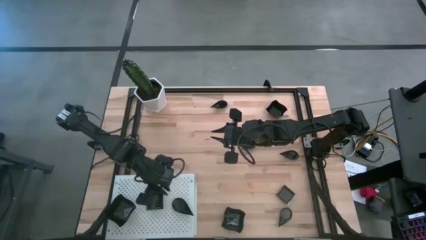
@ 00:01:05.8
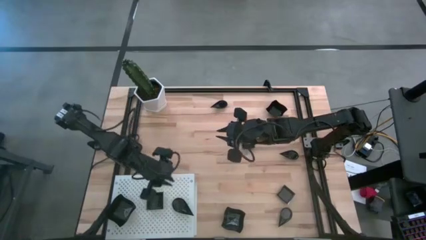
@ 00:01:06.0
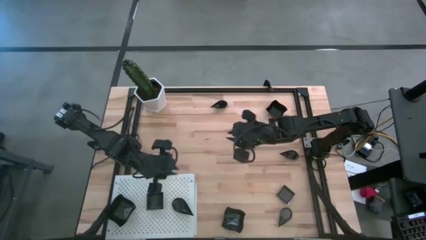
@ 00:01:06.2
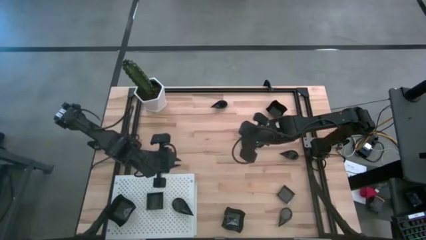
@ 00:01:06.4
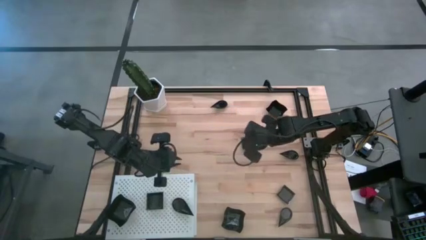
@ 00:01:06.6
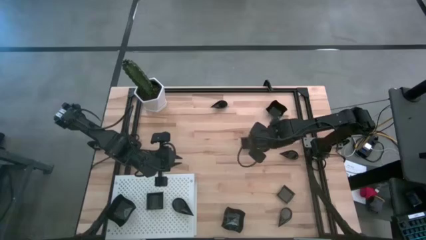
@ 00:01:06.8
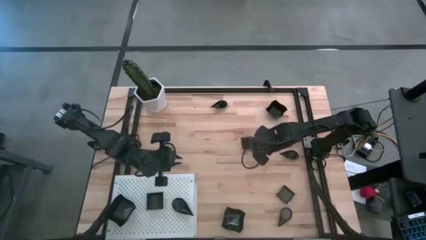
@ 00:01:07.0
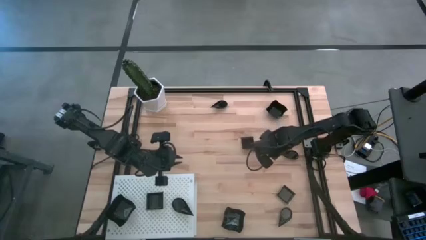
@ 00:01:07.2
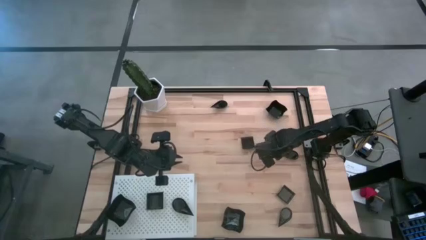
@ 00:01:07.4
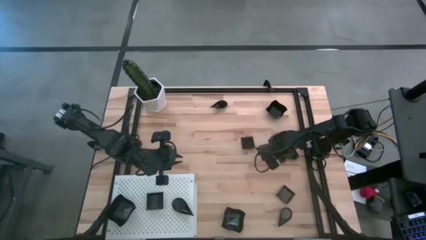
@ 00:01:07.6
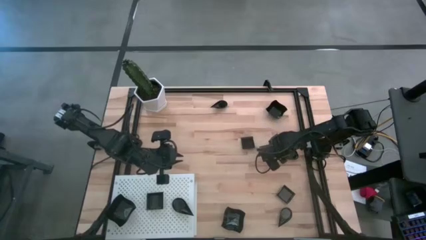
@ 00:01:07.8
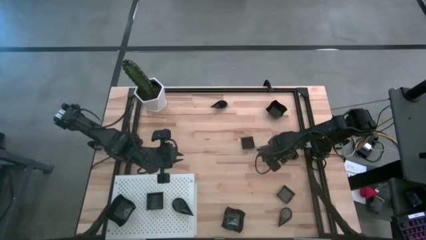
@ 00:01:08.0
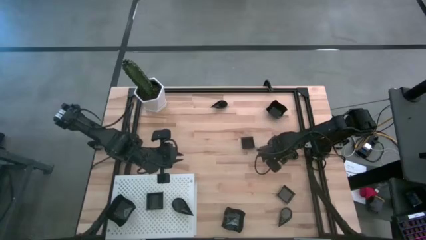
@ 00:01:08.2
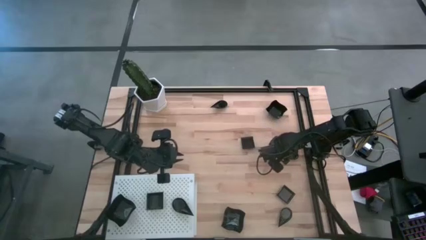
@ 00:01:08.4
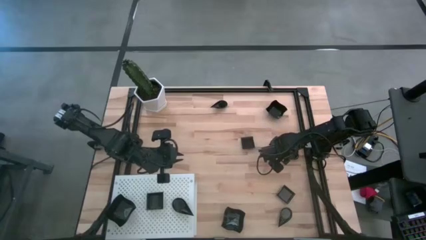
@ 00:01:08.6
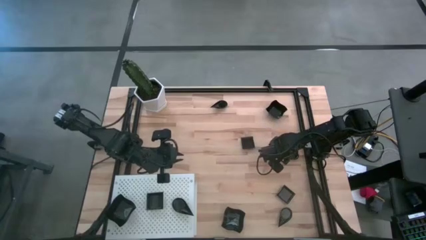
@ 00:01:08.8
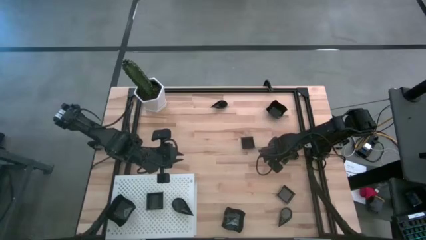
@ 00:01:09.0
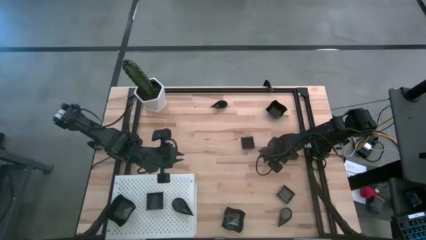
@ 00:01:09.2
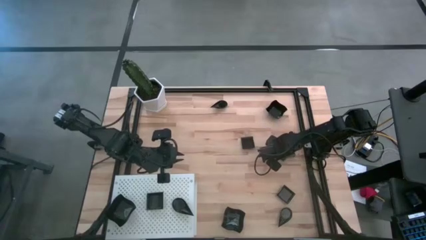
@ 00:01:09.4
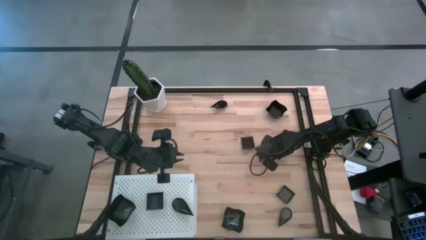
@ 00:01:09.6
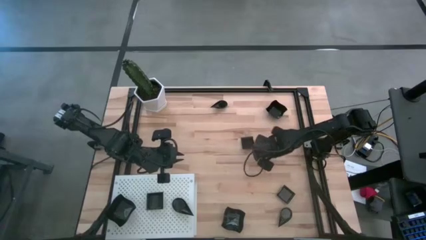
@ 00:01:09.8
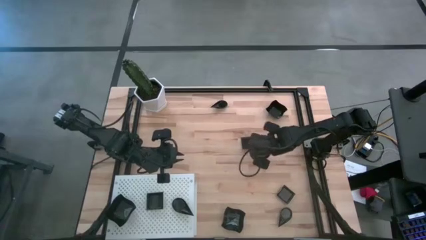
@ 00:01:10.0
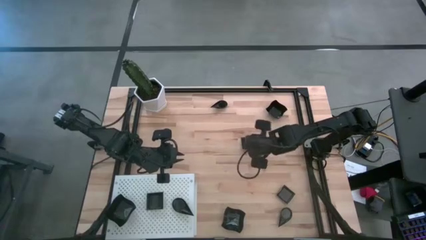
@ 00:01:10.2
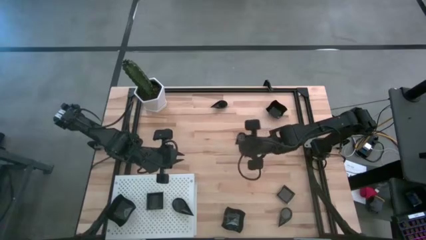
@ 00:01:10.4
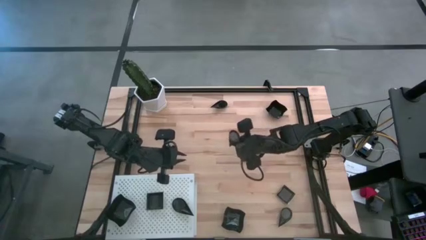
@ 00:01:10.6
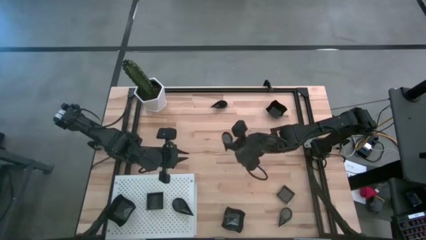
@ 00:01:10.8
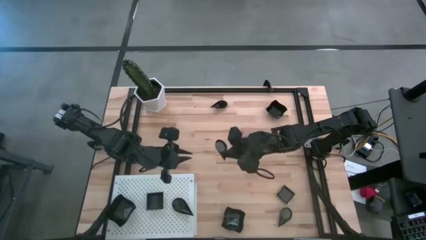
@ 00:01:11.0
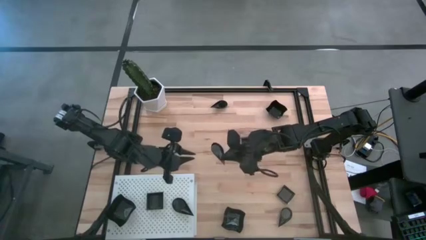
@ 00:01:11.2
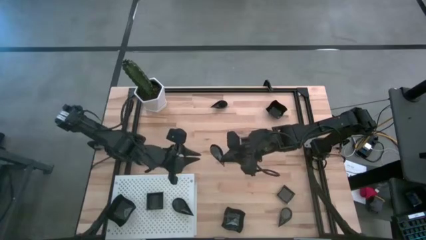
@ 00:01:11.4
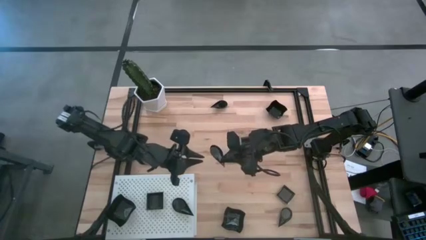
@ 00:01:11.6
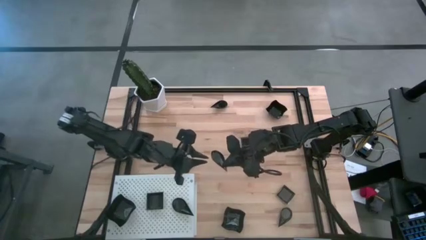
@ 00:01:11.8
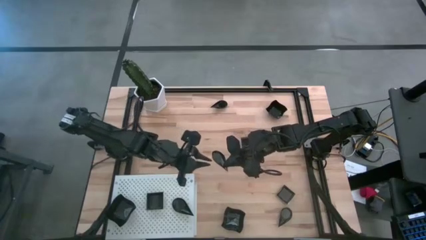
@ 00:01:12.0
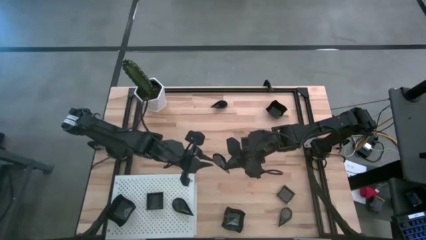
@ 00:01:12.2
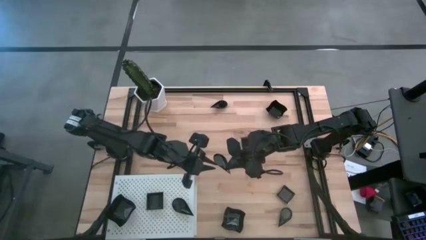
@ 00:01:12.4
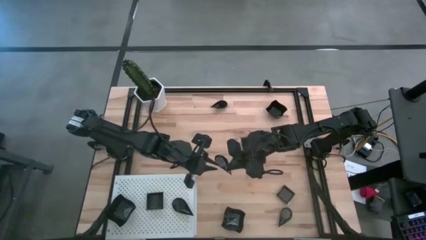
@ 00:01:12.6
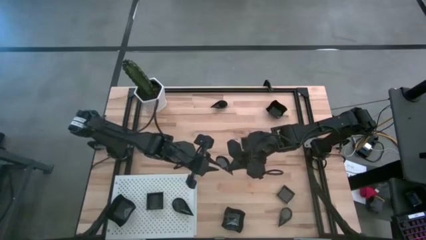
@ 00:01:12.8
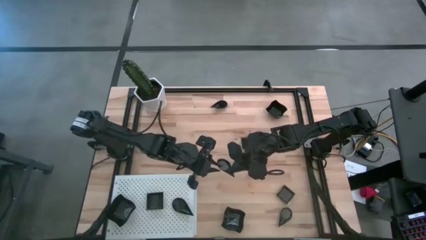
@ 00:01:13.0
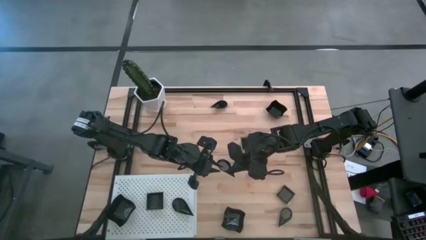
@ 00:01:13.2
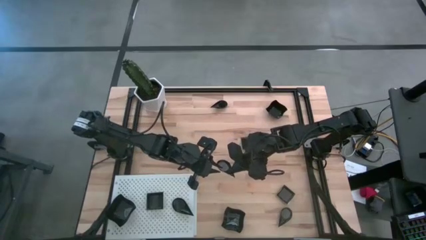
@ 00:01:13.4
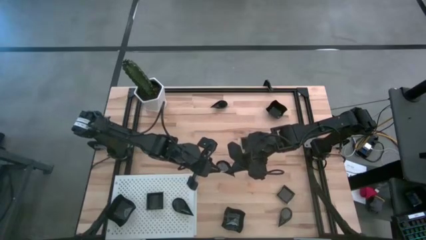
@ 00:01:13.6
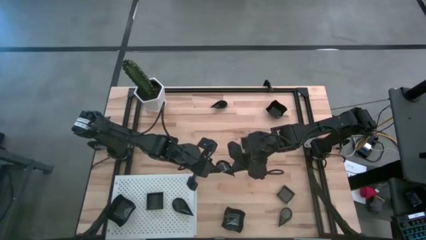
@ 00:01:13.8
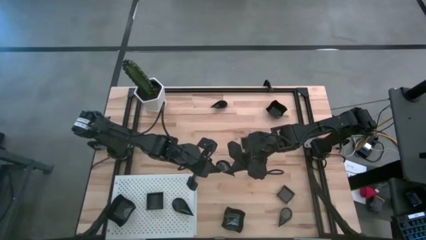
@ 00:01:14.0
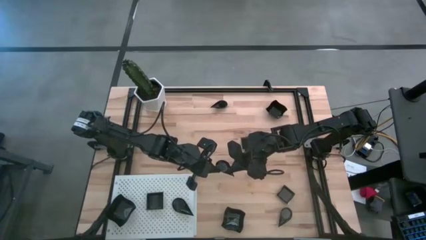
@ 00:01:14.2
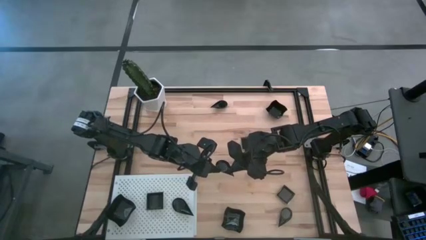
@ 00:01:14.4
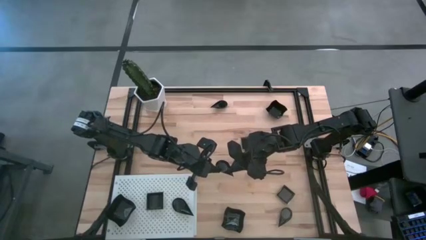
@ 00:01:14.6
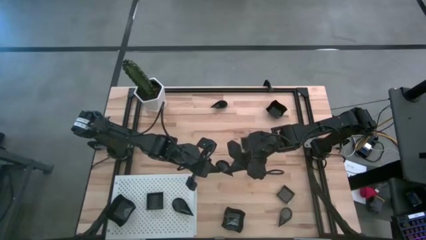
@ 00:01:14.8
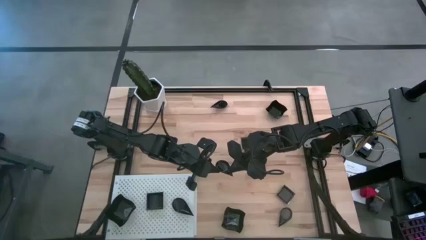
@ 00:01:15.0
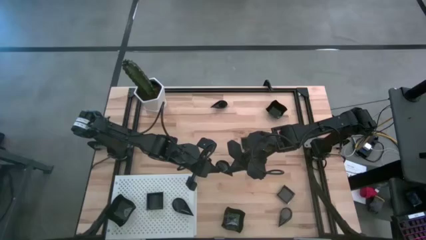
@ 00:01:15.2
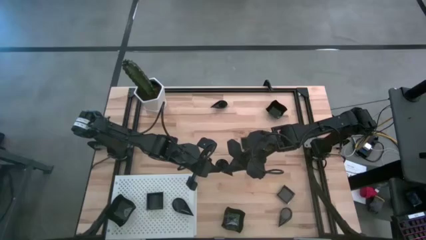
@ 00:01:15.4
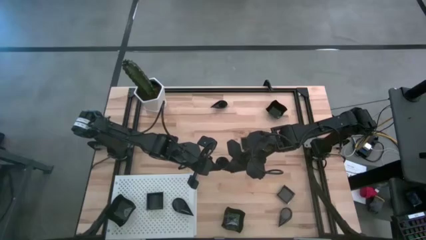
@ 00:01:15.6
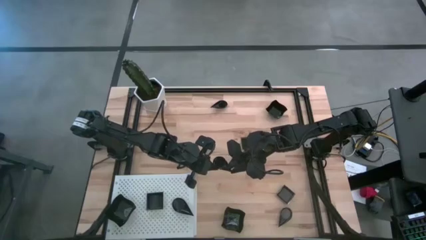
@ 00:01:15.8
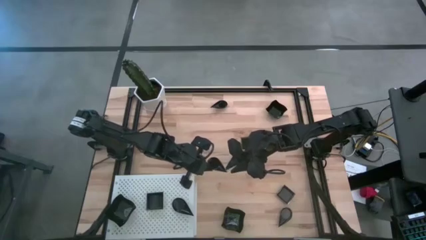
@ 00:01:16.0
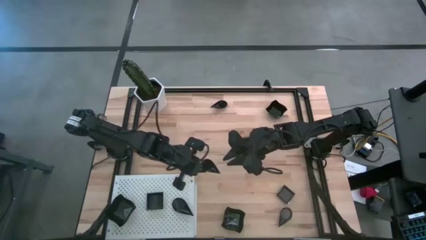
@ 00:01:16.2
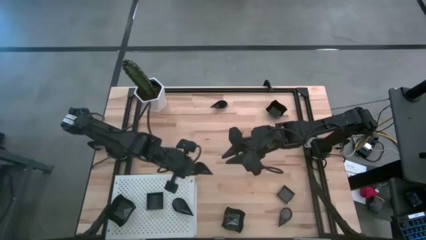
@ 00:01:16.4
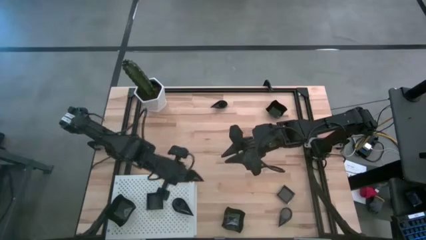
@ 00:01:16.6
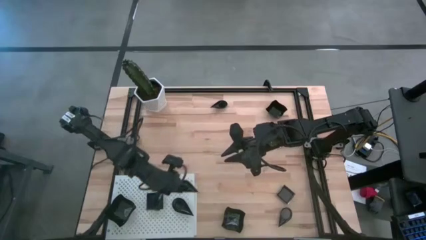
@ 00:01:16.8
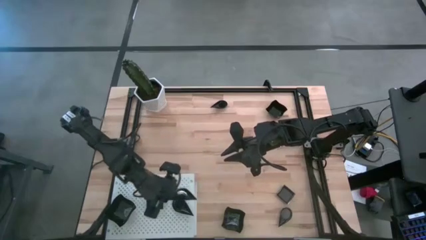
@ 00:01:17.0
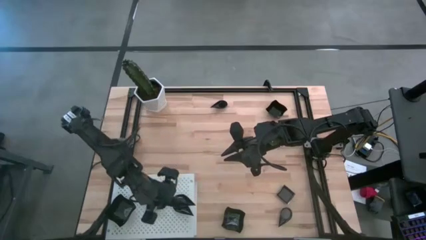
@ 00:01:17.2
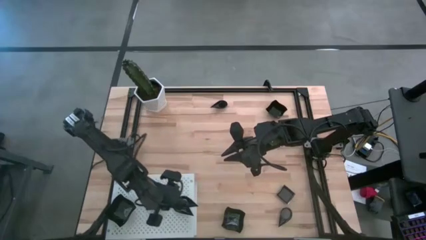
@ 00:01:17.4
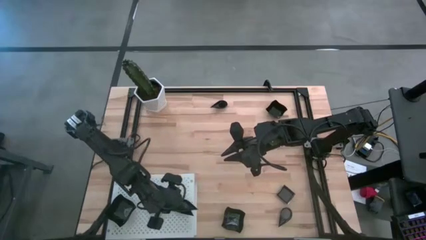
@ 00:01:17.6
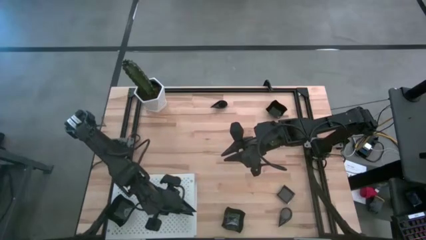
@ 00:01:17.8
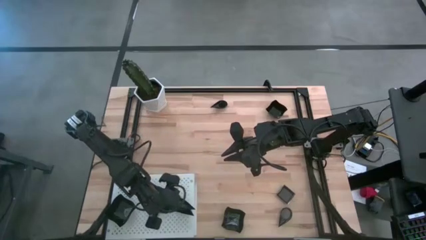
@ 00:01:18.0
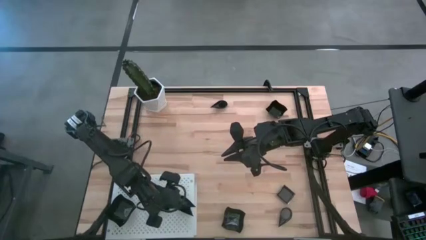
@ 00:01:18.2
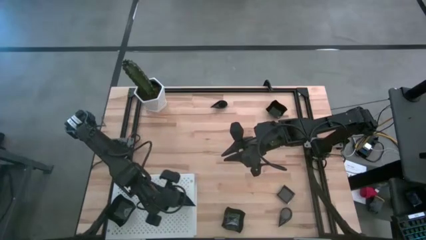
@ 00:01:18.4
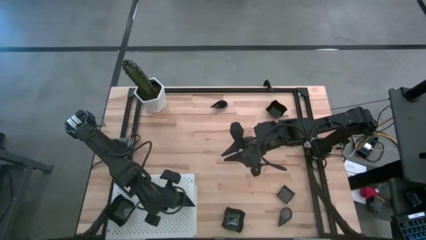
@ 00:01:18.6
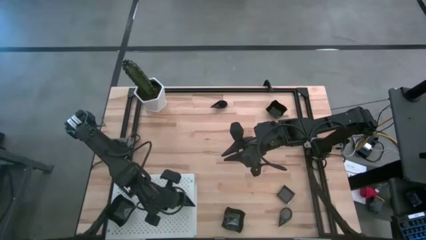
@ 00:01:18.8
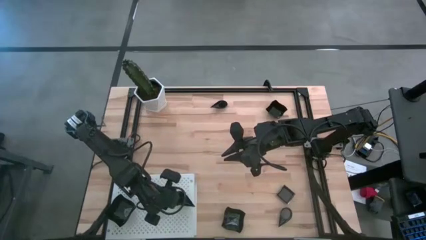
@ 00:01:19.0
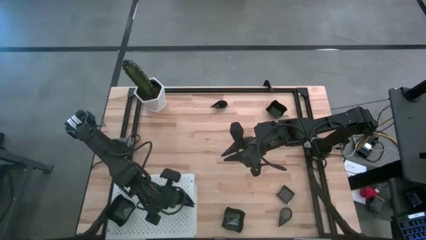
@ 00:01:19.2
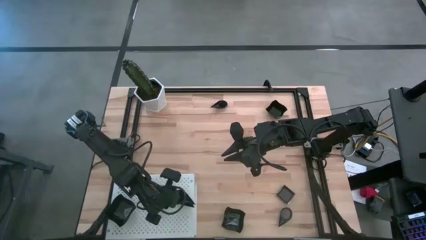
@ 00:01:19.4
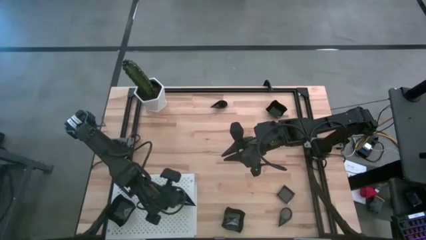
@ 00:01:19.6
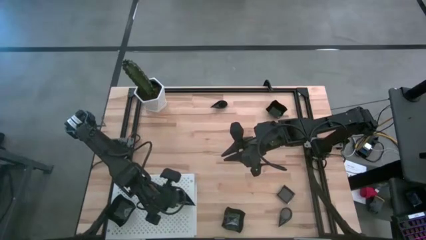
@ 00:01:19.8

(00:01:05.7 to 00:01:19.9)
Task: Pick & Place Mini shaped plates
Stack the drop shaped plate on top of the other drop shaped plate on the shelf
